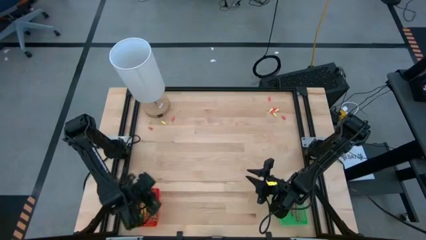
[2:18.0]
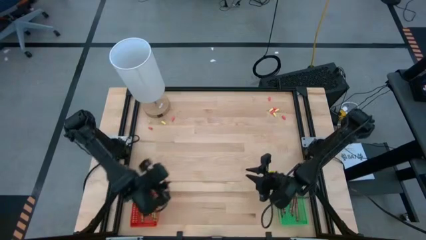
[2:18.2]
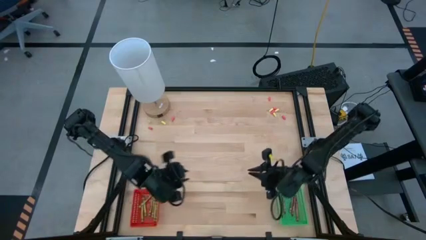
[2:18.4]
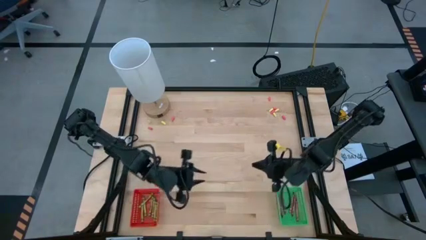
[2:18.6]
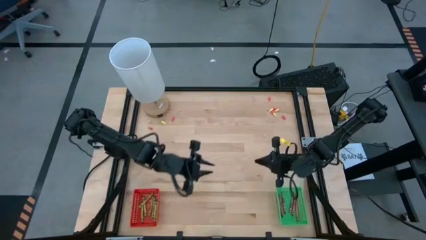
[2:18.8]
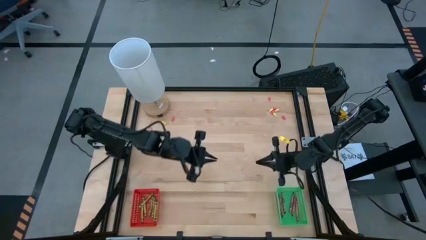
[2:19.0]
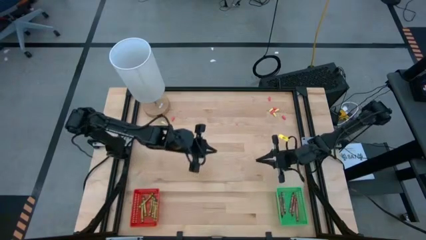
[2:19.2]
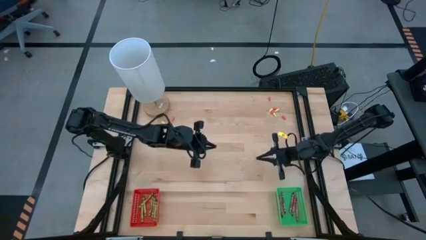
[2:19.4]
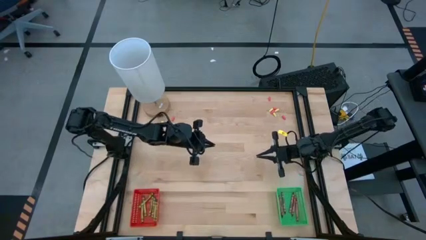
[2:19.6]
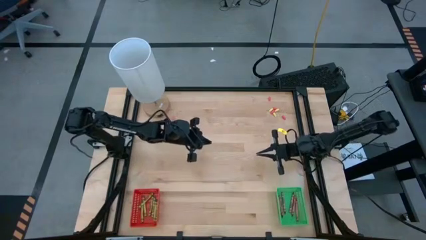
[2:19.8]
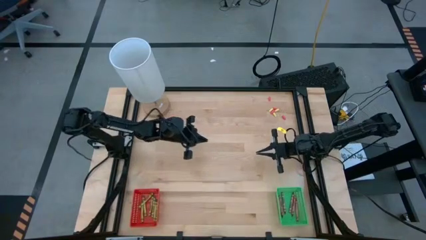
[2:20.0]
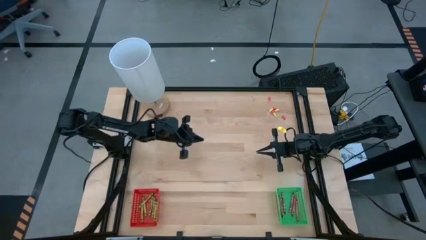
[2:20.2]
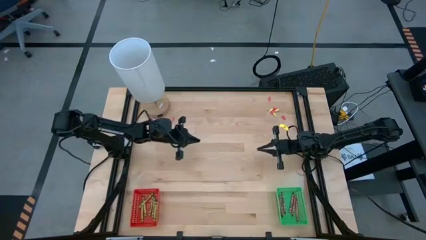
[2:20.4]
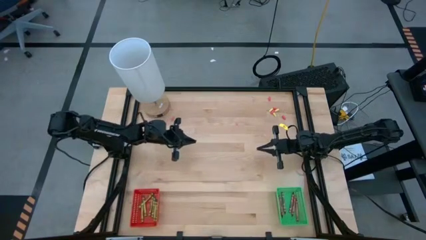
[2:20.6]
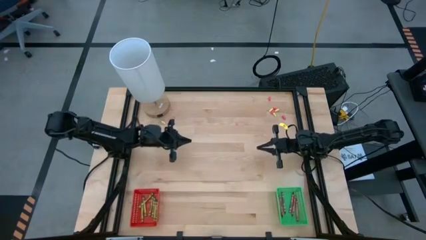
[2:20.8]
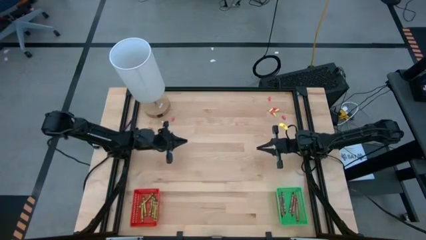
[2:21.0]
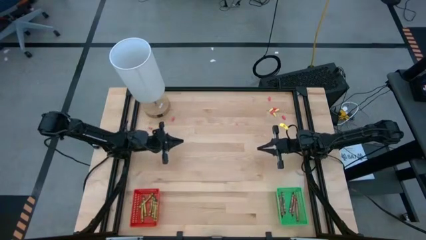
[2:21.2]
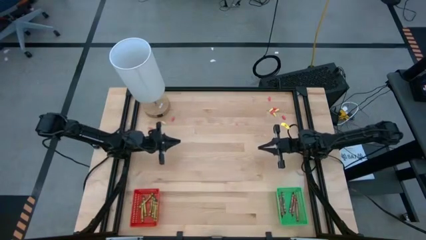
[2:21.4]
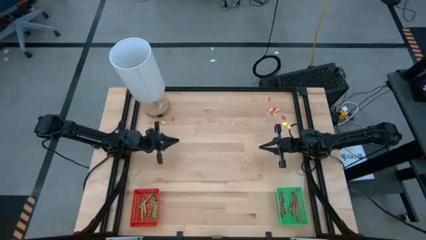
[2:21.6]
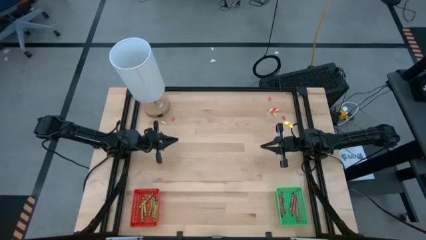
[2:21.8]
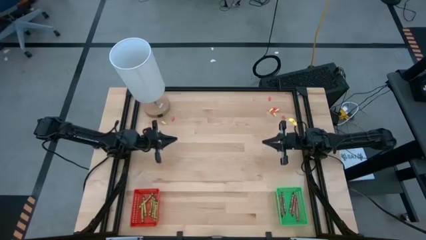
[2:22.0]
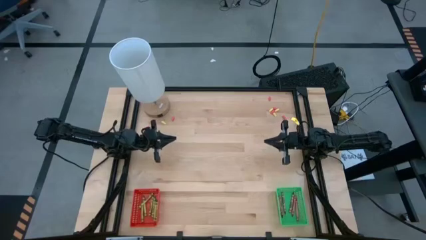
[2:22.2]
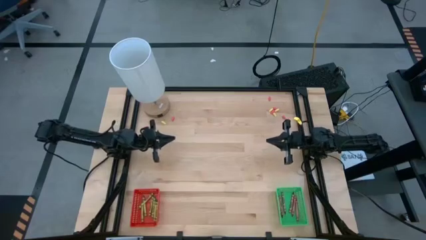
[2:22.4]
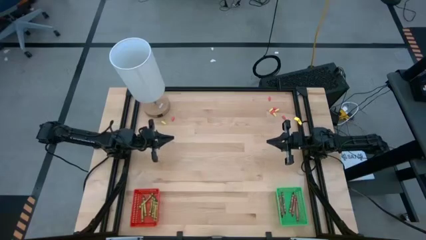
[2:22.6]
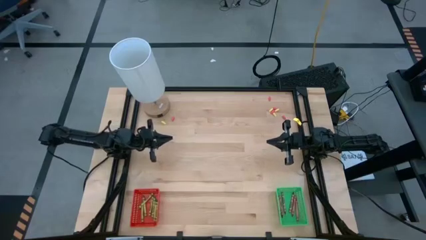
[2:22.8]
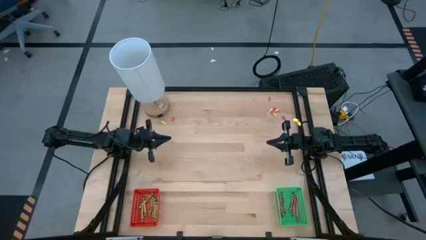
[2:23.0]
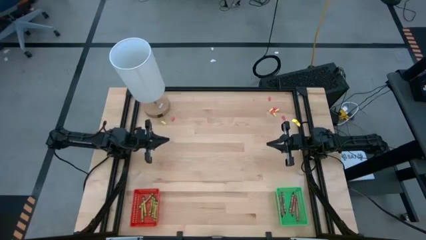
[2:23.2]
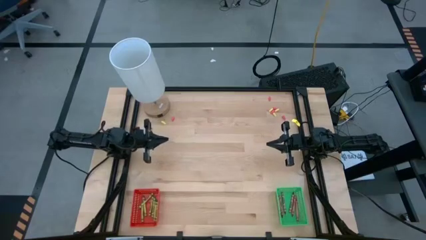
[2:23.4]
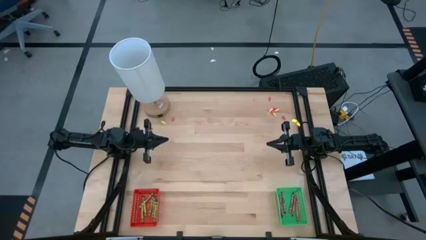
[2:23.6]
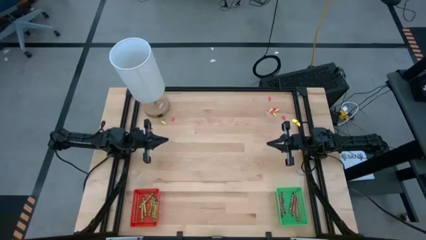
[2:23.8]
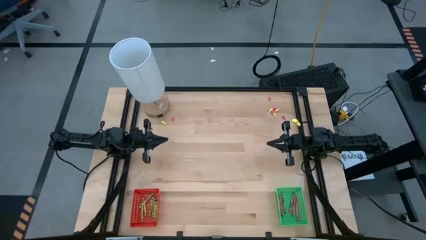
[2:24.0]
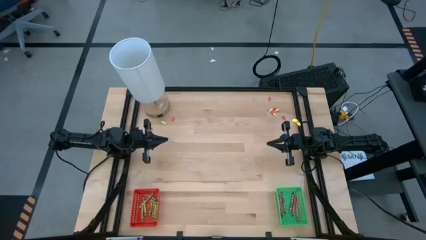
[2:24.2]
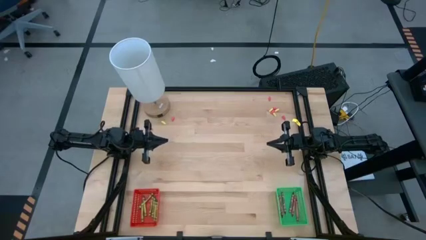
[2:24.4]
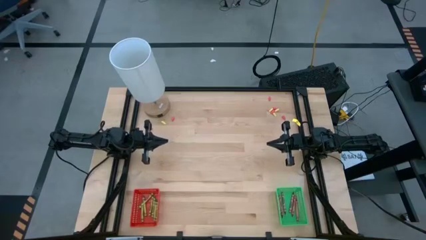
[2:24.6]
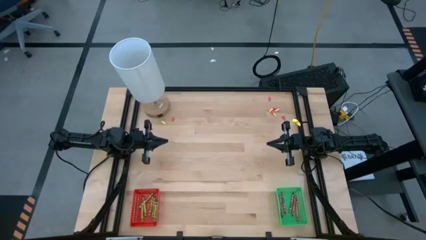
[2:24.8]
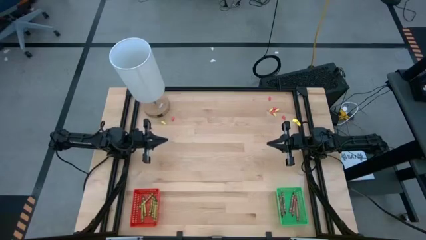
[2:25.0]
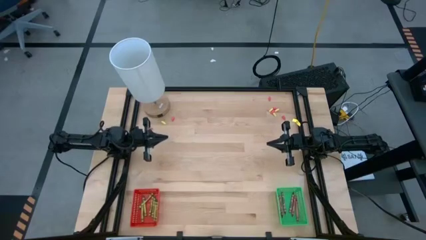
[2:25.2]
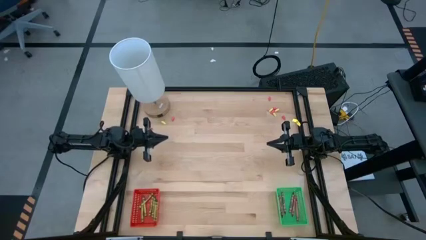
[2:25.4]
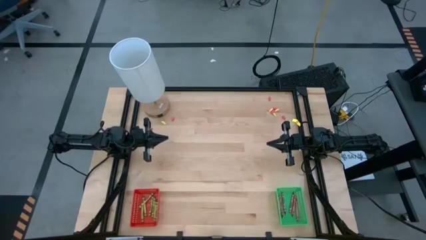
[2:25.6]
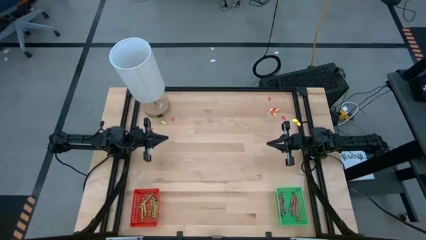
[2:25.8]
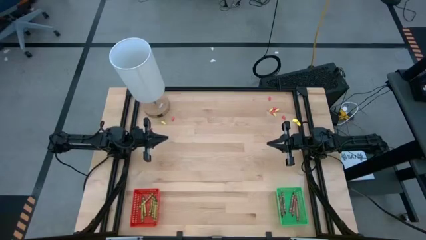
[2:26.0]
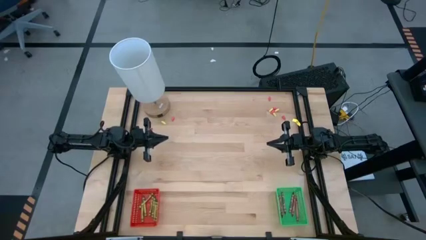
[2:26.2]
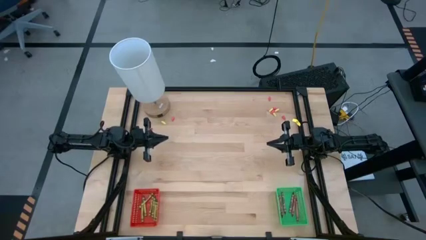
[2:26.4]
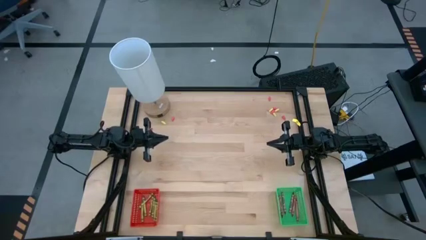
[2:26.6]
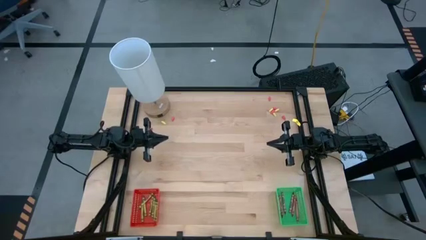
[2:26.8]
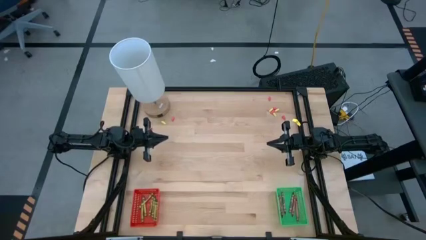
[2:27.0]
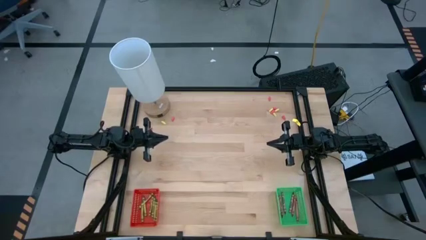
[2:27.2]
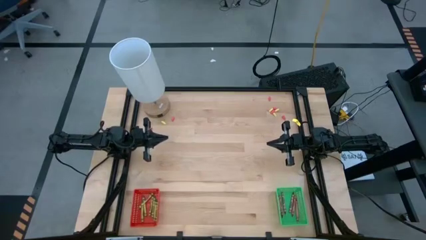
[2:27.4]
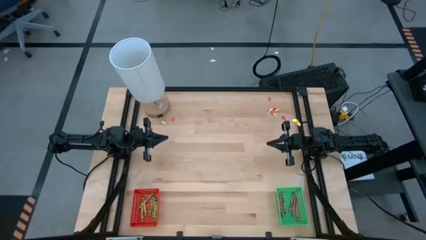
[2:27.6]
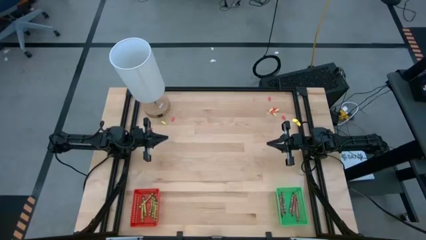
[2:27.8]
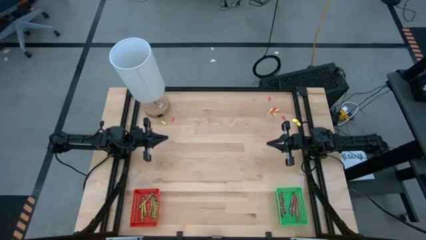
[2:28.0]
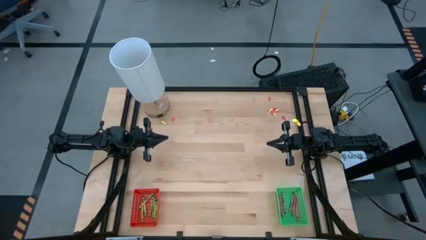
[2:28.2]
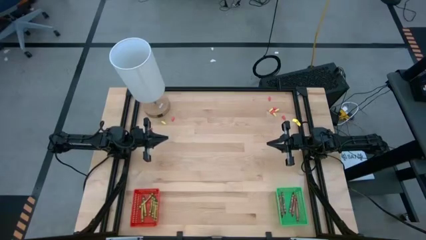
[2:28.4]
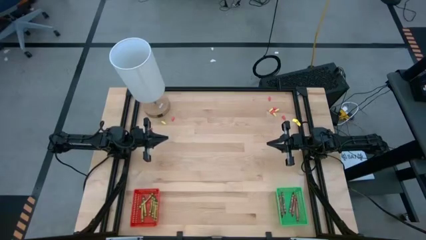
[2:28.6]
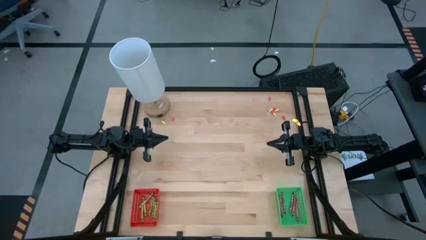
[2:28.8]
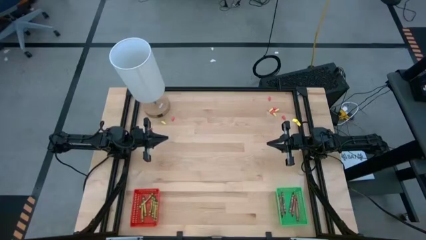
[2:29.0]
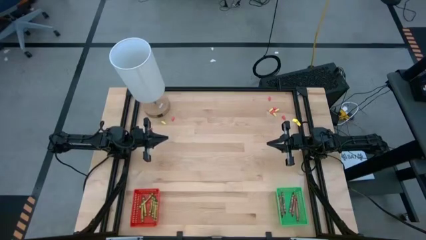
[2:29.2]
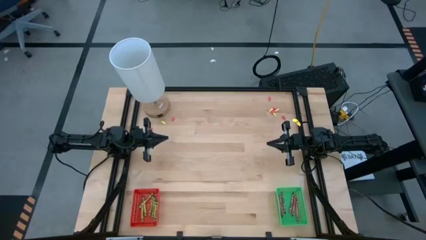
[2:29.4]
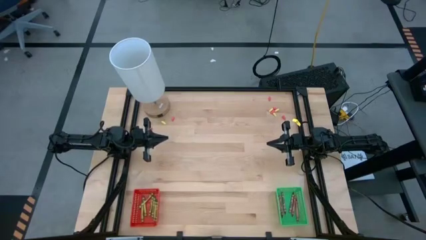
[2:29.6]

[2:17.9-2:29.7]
Task: Sort crayons
Return to Home Position

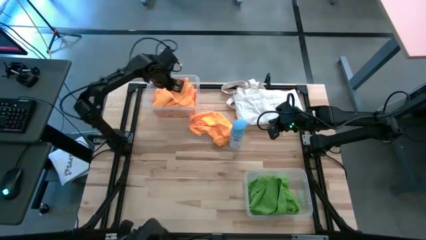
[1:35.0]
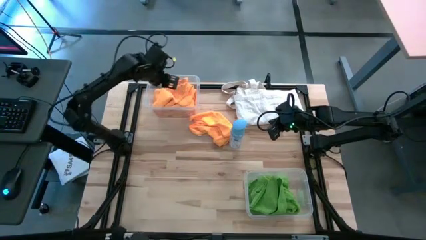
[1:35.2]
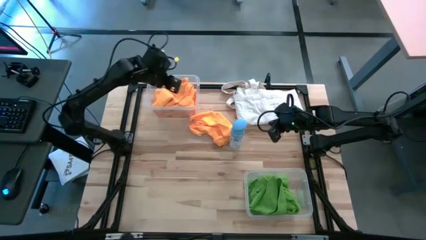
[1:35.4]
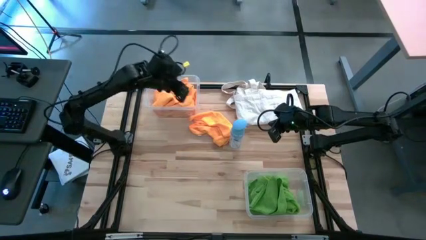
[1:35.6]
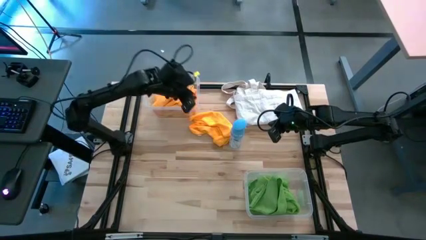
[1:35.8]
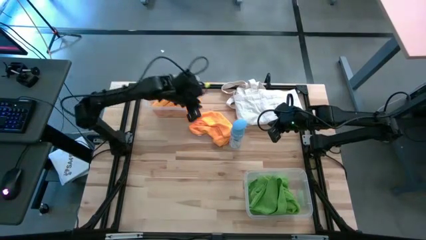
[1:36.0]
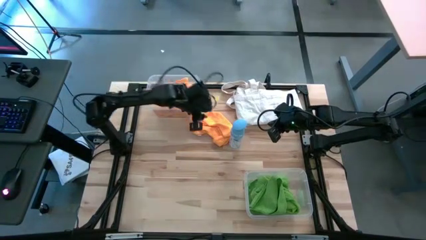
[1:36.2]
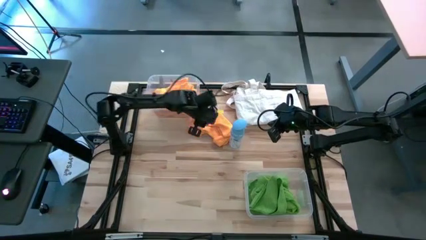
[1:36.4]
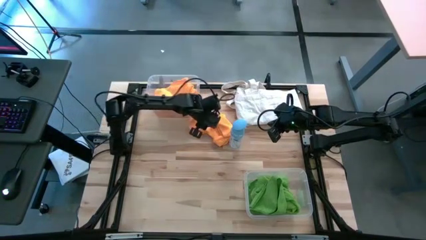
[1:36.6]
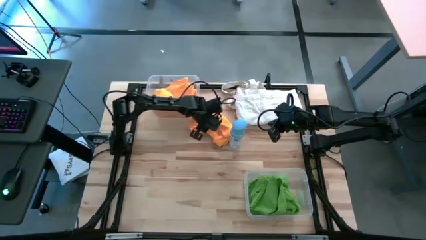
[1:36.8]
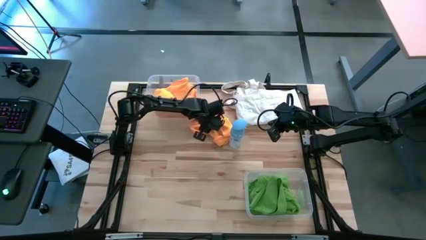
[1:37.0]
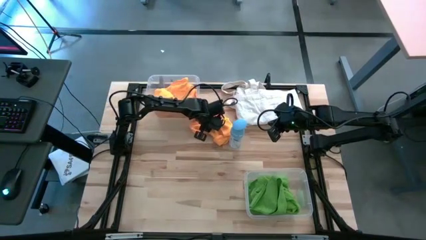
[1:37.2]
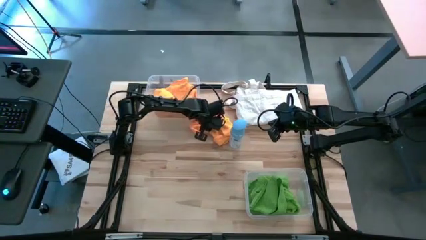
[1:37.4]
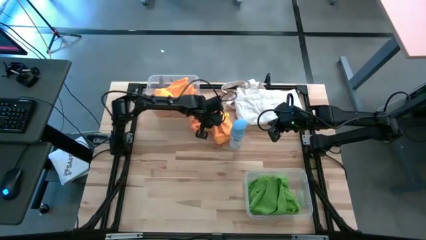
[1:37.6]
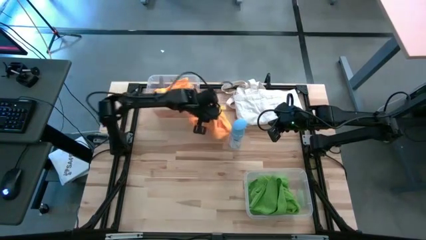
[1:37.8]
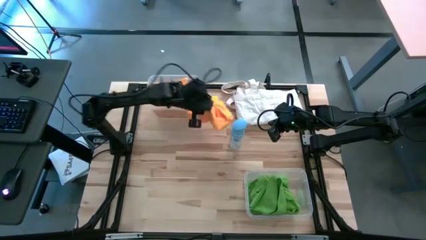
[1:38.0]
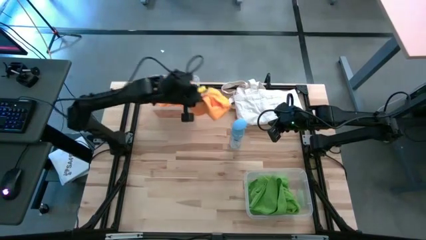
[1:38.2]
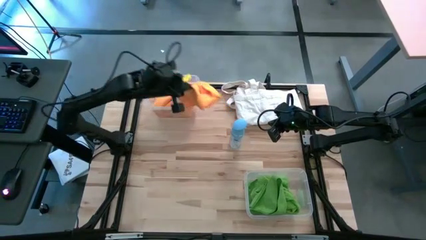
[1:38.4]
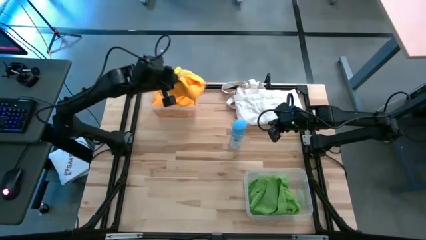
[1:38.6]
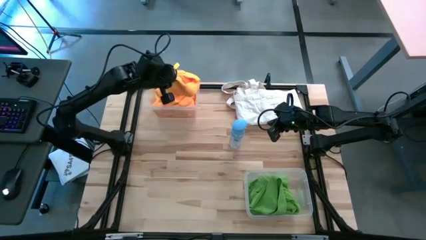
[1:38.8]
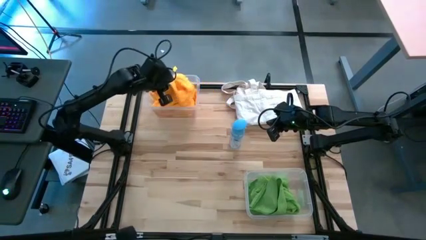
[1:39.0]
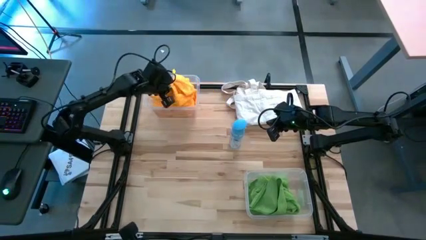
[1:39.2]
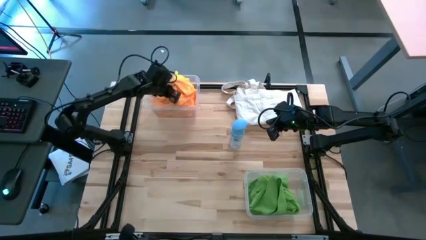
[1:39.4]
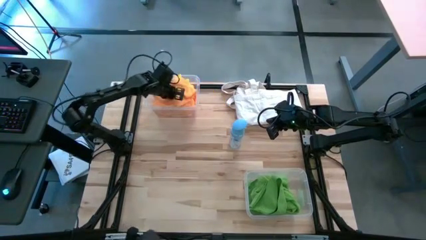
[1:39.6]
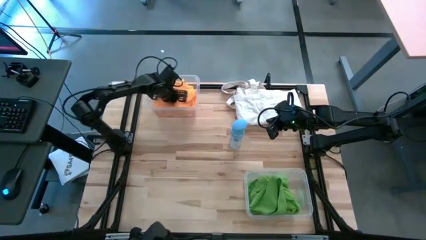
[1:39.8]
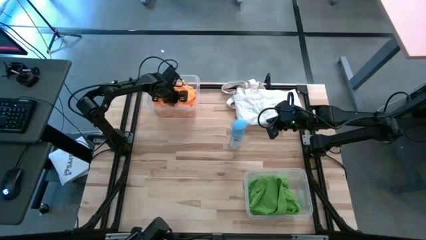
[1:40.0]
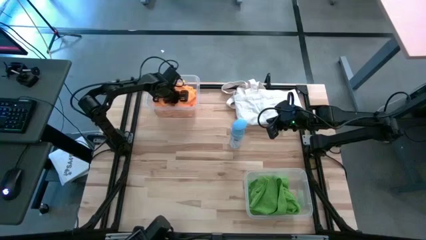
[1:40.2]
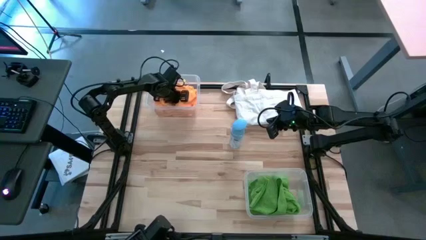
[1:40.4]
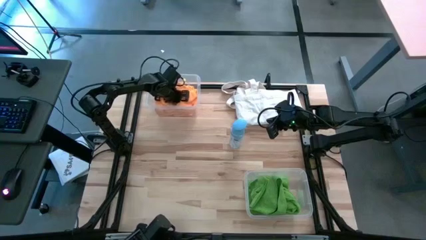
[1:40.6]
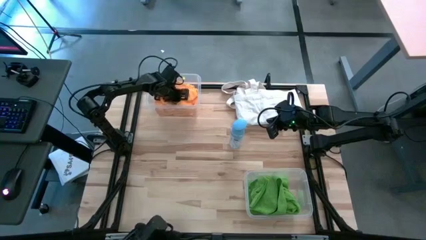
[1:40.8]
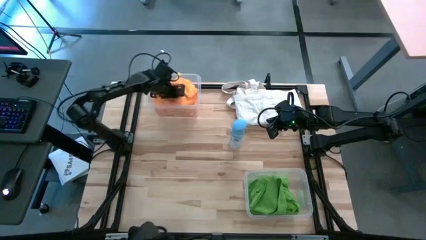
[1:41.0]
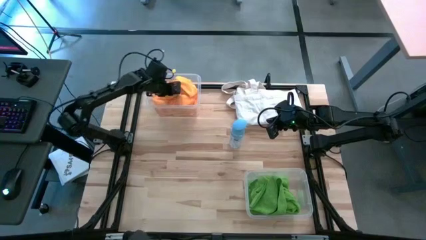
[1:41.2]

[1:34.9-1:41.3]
Task: Sort microfiber towel by color & place in baskets
Put the yellow microfiber towel into the top transparent bin
